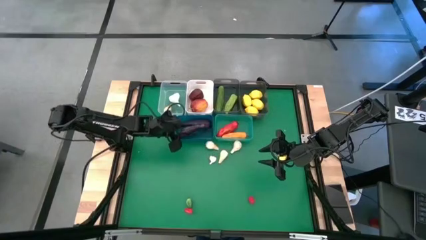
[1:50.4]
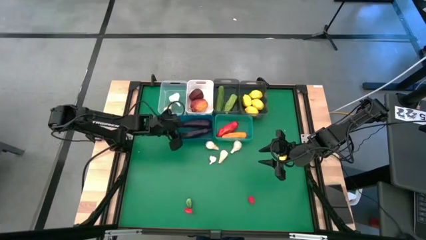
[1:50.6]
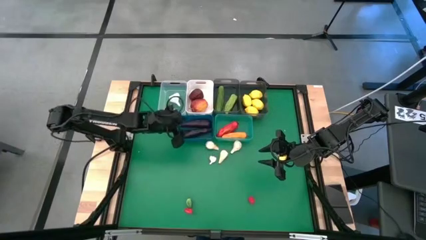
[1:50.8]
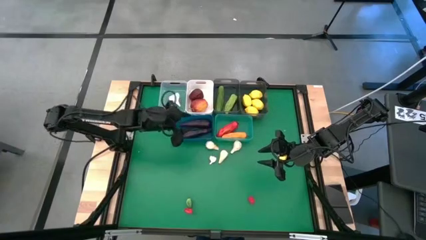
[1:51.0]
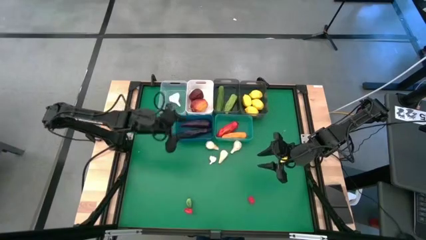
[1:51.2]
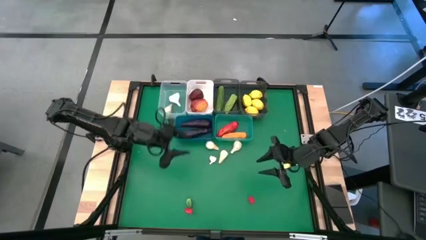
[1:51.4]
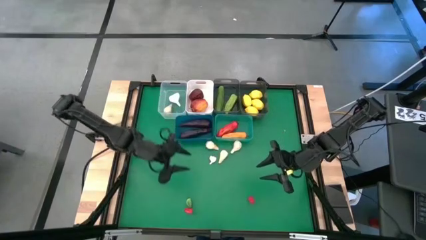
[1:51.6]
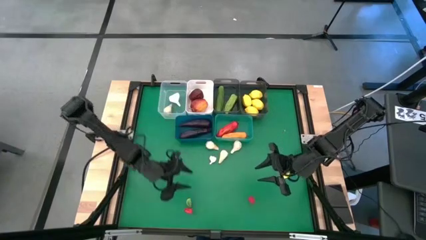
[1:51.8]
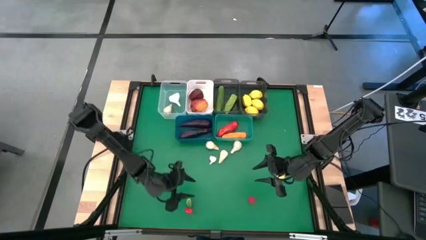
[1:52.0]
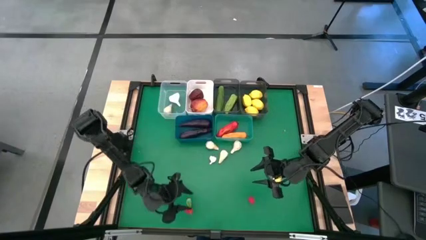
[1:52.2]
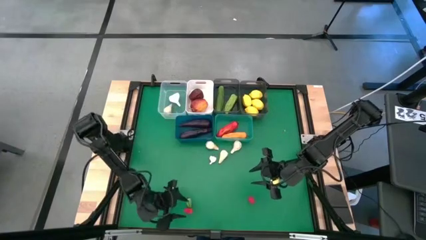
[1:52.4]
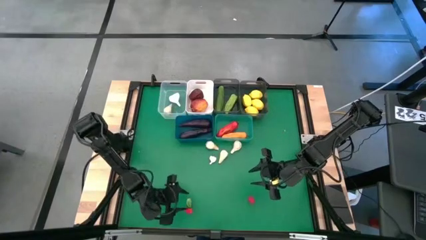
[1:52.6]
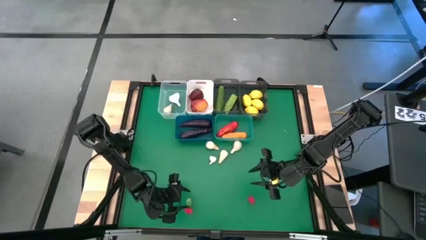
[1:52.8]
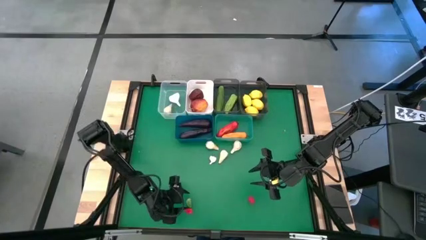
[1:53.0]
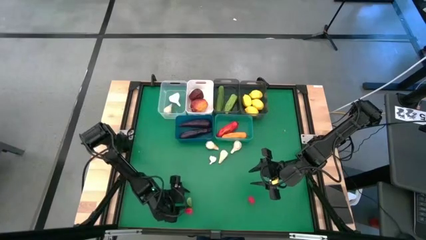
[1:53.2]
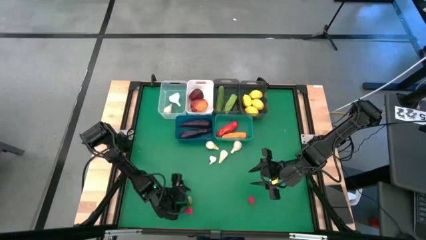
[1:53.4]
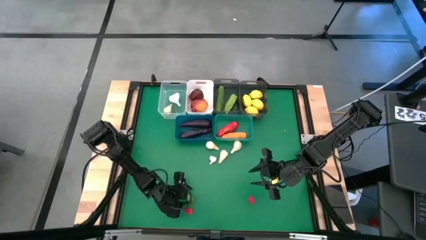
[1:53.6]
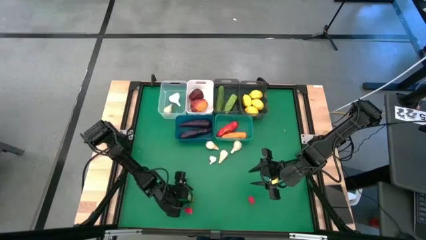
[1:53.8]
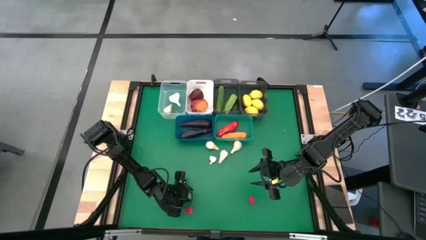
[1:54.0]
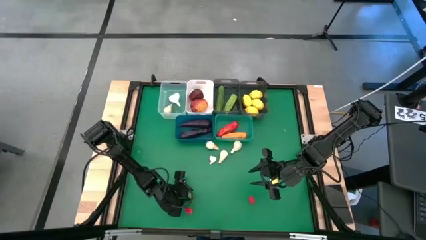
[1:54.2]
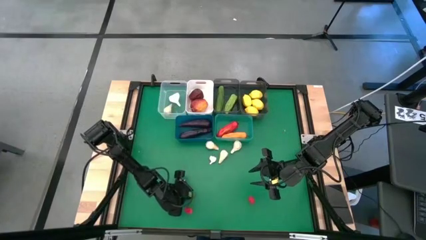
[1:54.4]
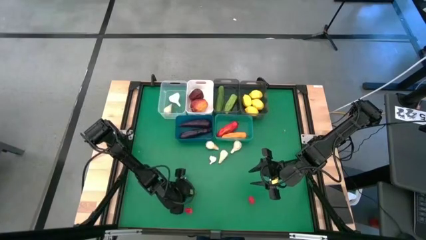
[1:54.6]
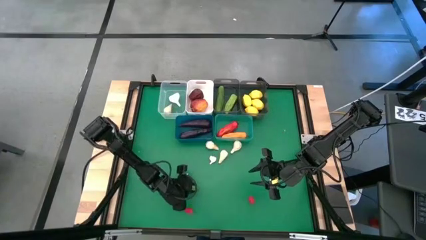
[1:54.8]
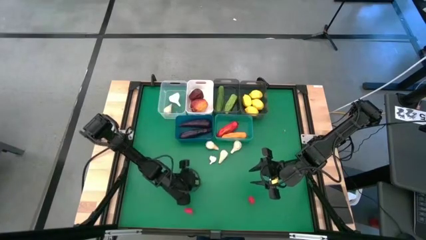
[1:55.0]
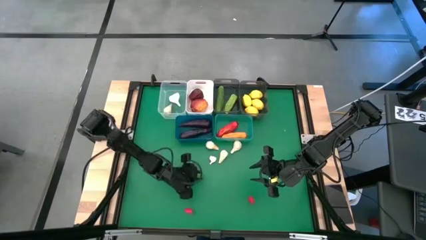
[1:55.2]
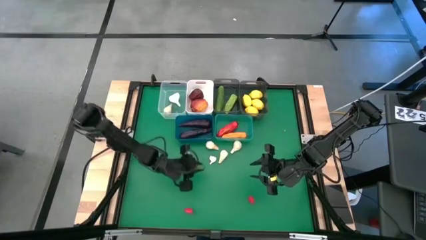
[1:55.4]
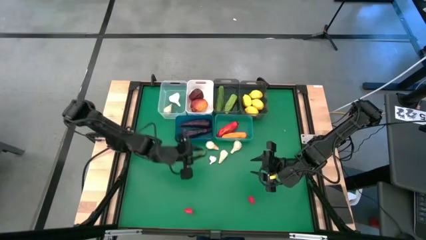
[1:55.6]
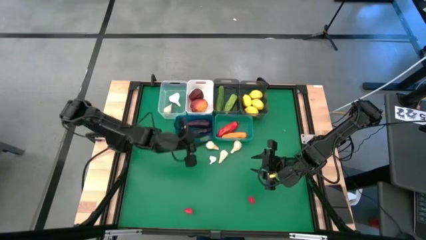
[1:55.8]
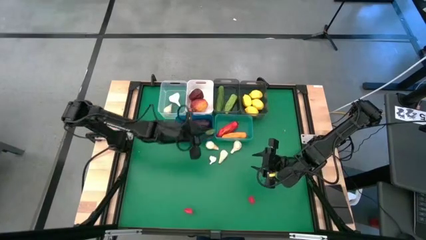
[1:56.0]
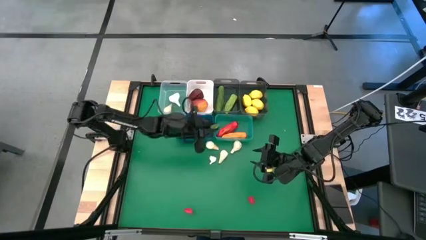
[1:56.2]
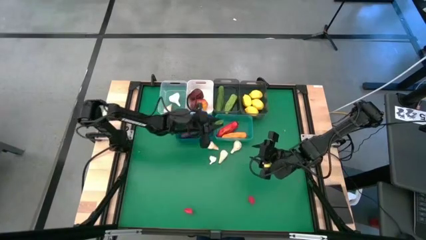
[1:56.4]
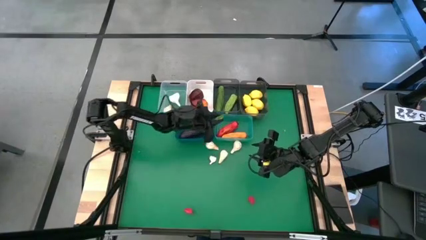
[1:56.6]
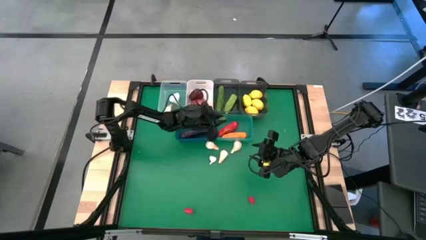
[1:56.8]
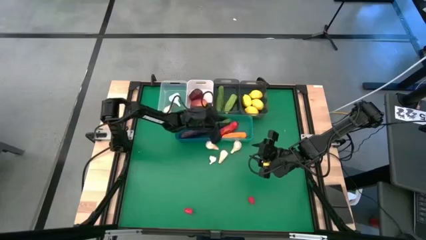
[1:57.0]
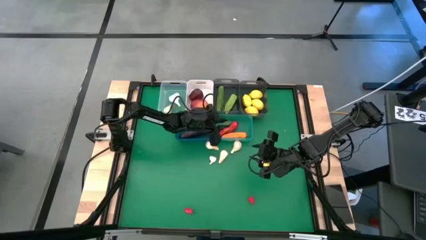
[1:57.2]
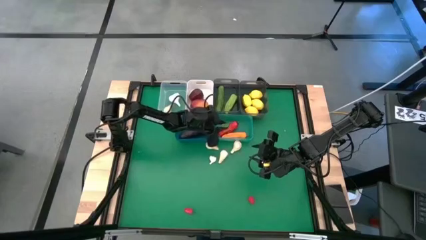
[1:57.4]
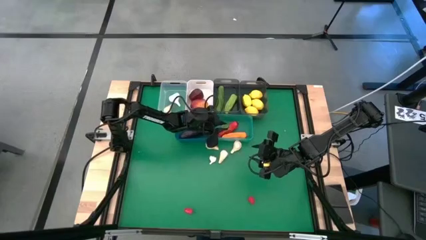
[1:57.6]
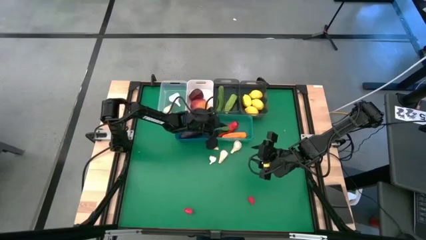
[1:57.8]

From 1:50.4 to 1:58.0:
Task: Sort produce into baskets
Put the green chili pepper into the light blue bin

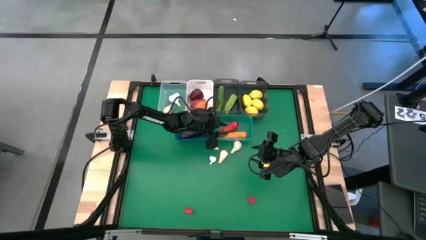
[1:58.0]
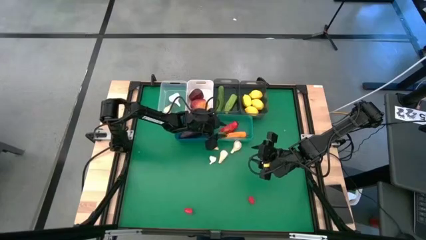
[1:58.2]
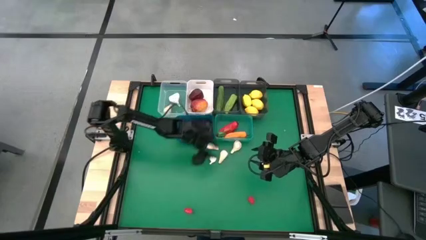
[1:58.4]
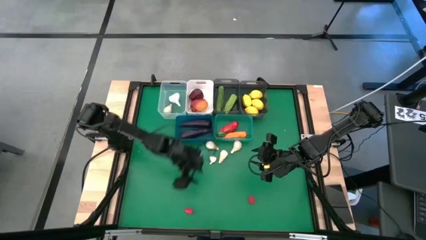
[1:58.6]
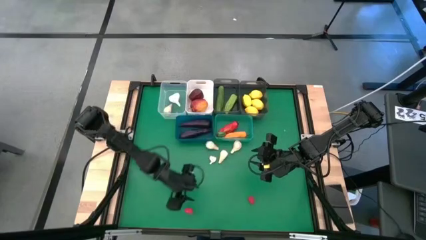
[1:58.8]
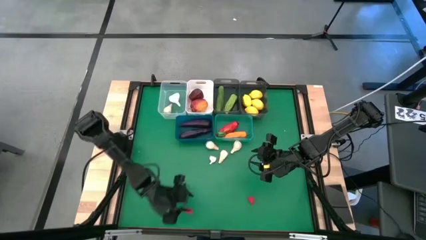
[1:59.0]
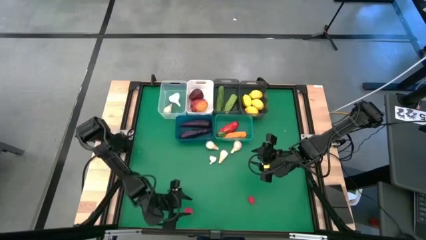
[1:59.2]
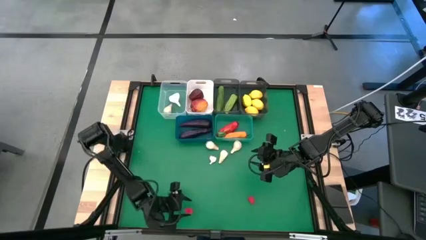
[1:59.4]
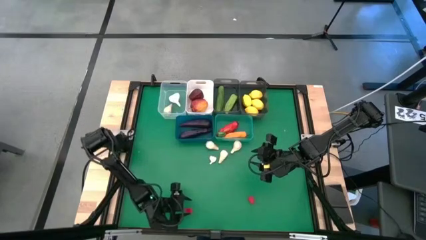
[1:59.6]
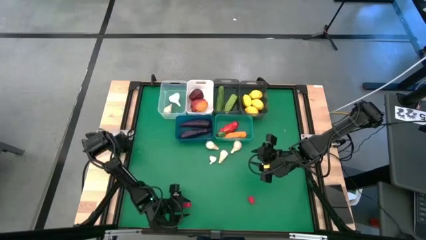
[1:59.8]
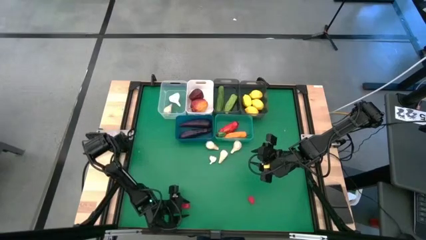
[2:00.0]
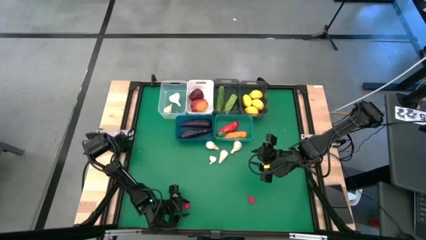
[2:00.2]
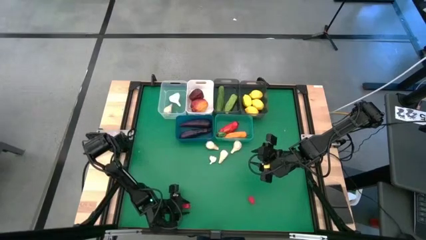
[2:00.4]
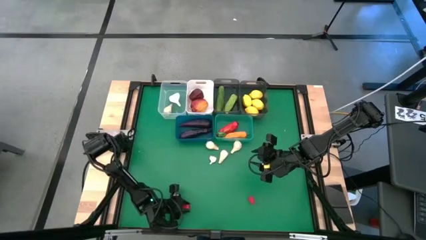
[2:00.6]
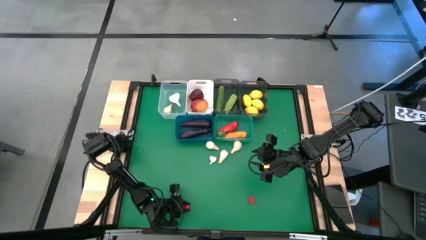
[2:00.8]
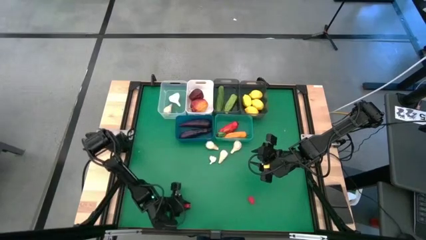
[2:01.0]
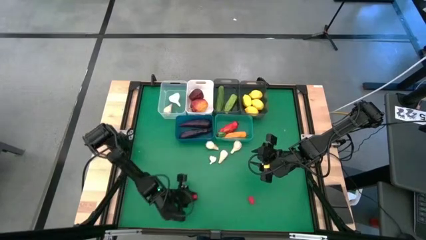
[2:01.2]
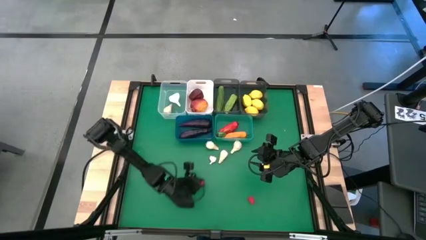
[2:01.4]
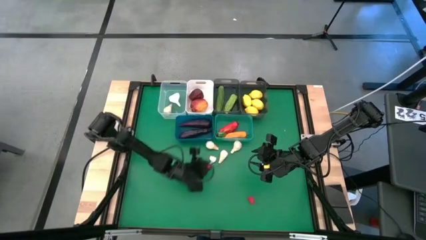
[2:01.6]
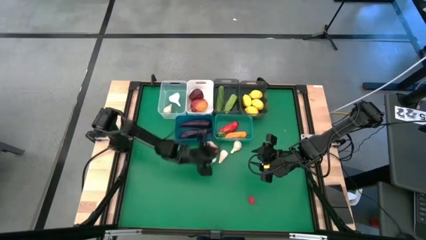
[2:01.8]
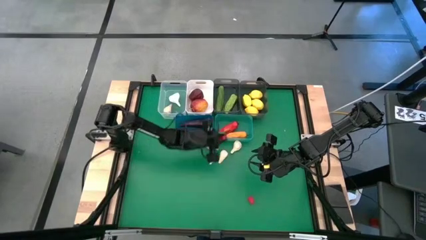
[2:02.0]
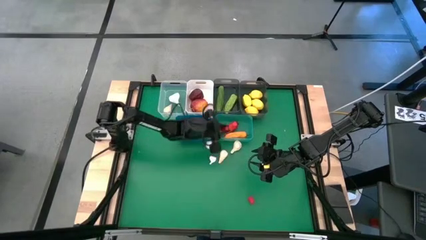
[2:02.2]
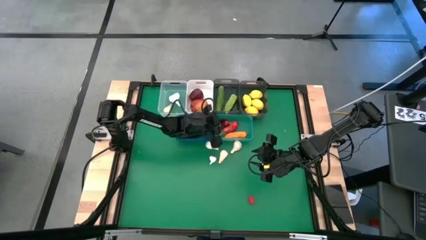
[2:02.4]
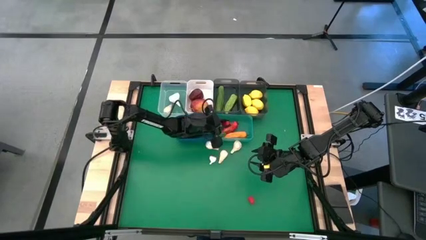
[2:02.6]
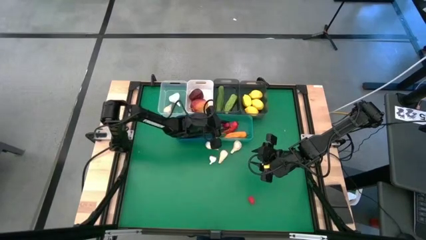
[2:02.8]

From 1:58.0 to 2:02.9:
Put the red chili pepper into the light blue bin

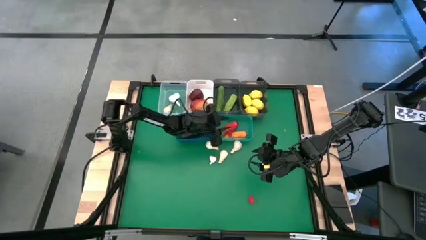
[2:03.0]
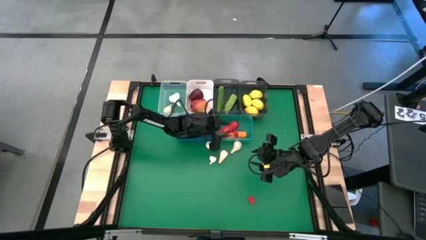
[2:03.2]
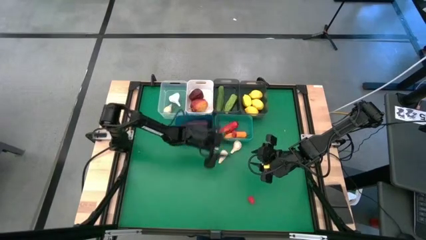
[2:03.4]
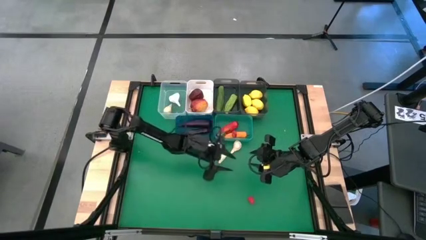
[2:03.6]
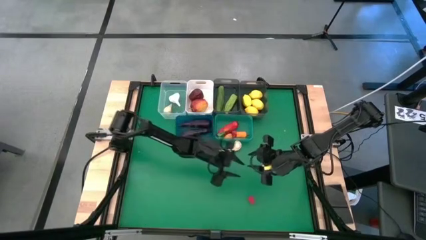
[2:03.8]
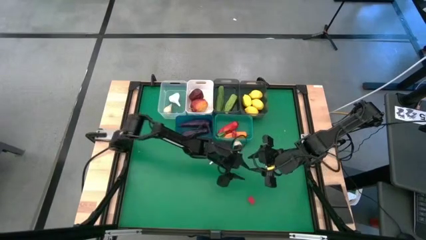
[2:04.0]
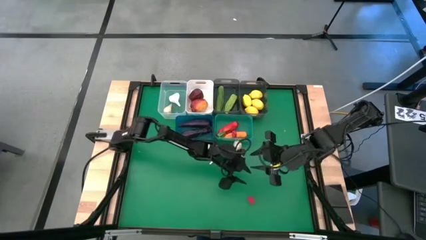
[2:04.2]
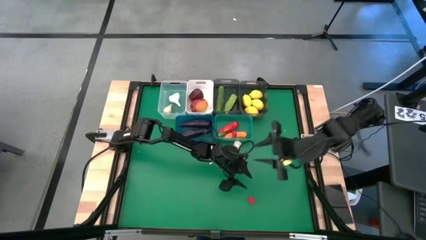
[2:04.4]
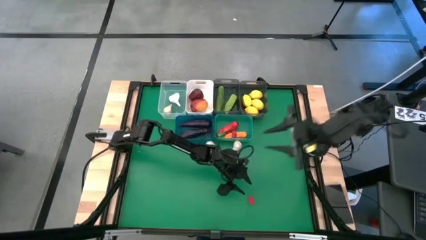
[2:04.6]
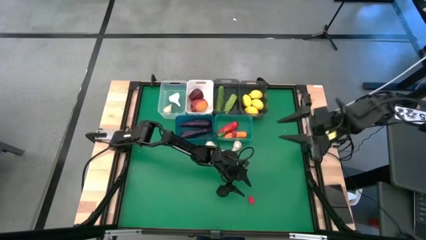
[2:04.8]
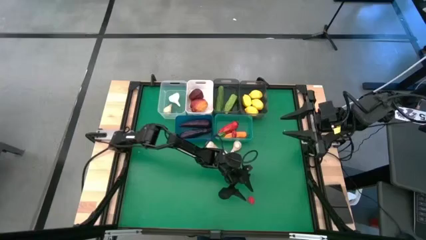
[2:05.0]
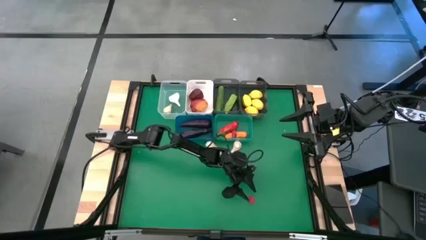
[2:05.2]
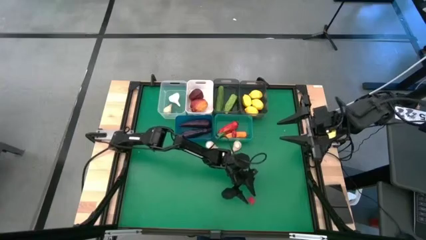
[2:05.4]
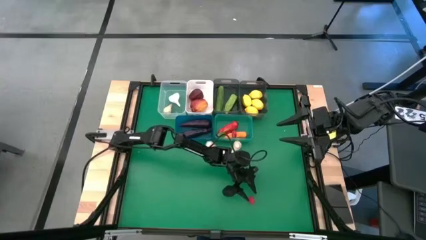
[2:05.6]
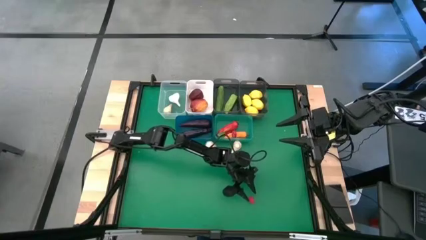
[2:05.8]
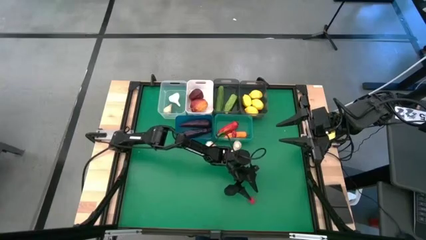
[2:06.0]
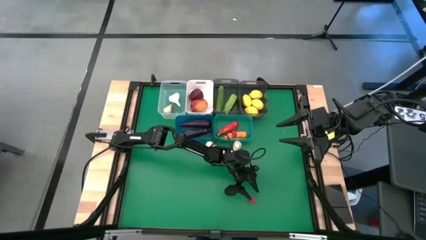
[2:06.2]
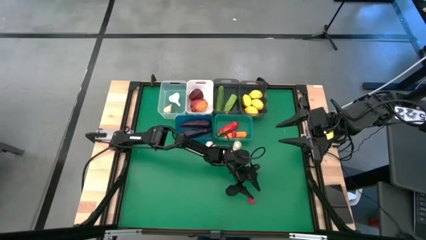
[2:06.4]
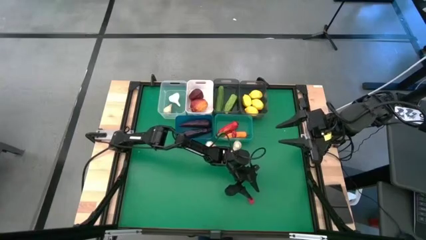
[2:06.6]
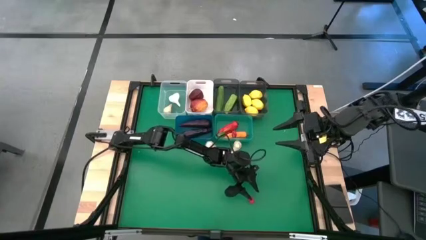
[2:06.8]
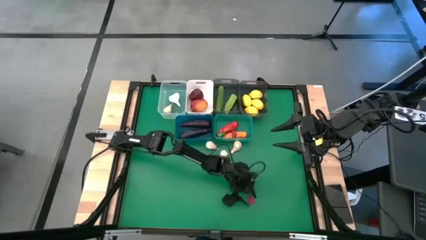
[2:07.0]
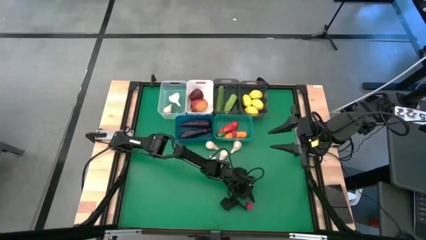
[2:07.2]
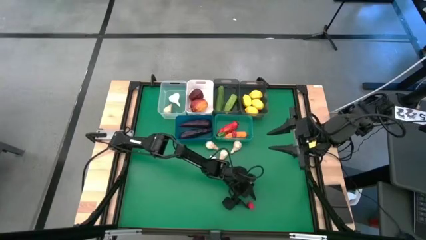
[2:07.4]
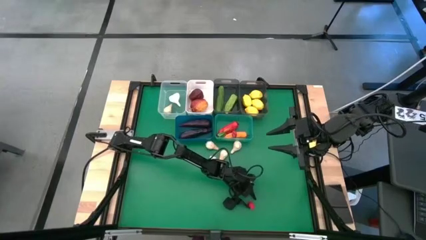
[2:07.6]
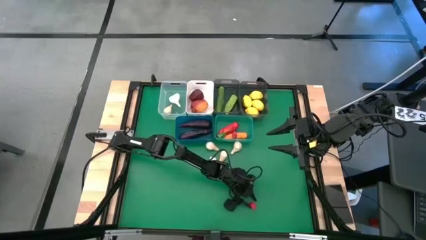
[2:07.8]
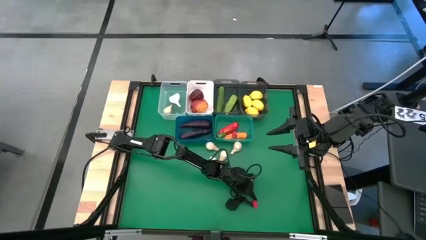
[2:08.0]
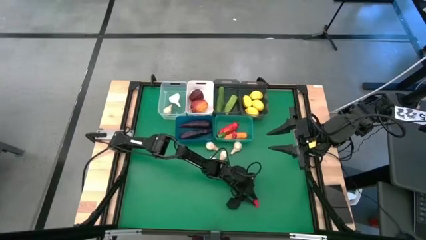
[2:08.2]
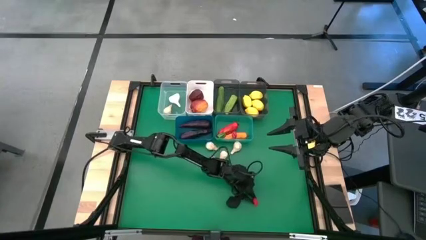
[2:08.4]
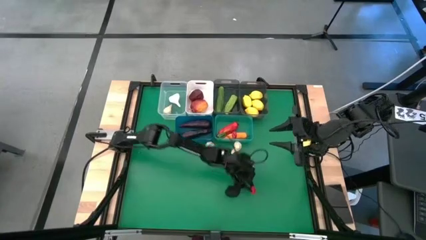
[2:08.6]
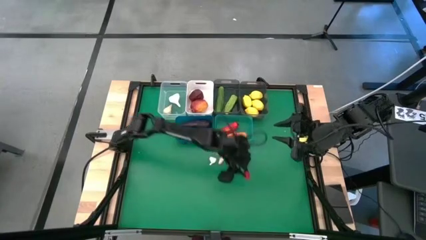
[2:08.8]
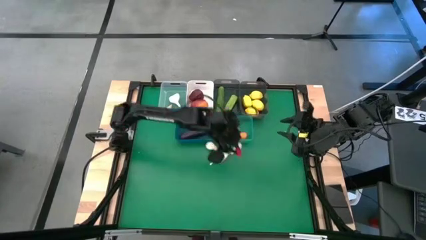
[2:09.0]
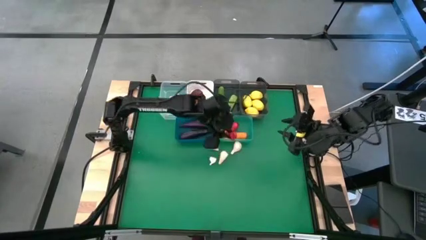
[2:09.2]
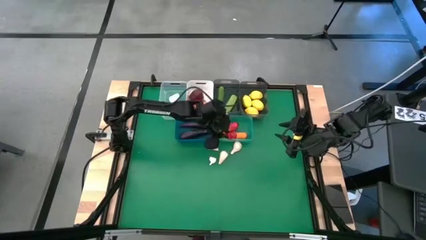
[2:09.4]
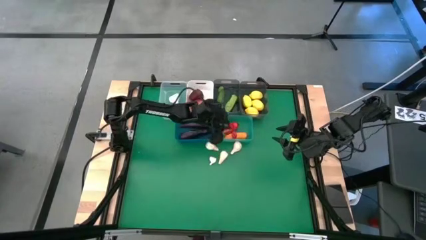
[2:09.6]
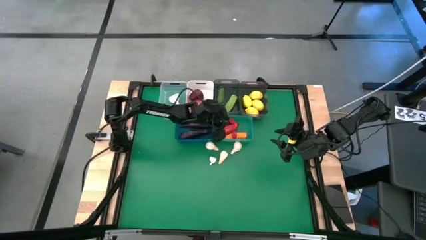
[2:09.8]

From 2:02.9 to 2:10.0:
Put the red chili pepper into the light blue bin
